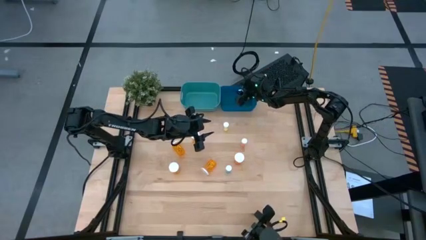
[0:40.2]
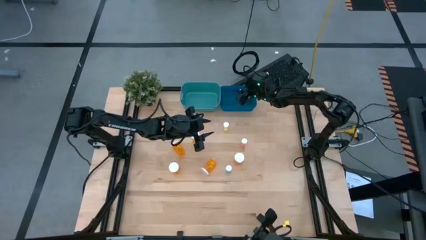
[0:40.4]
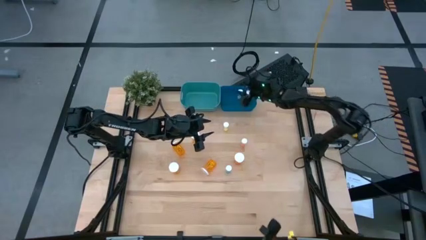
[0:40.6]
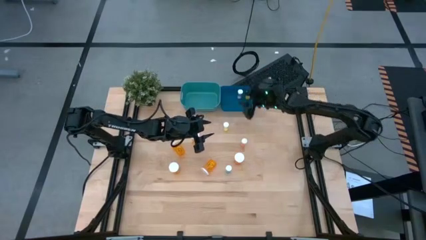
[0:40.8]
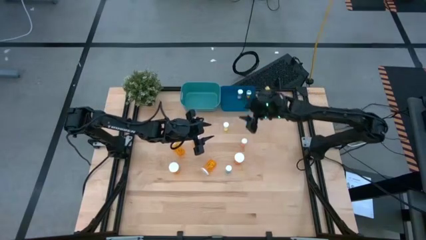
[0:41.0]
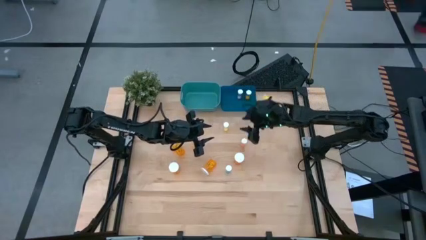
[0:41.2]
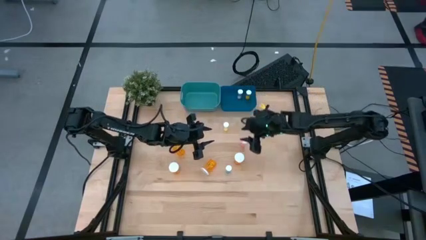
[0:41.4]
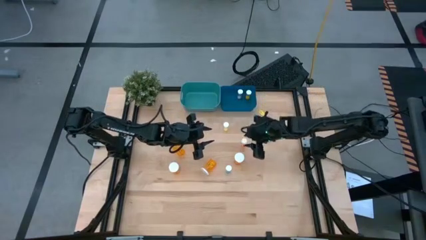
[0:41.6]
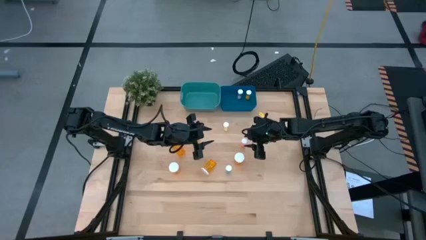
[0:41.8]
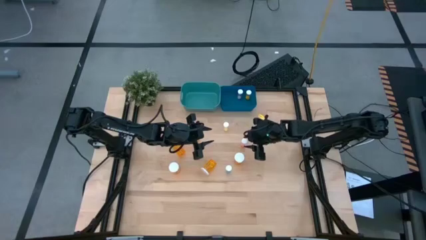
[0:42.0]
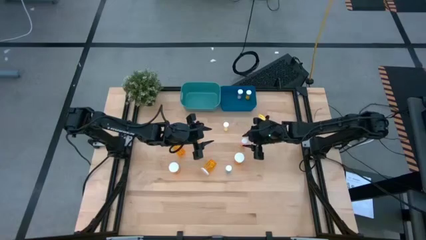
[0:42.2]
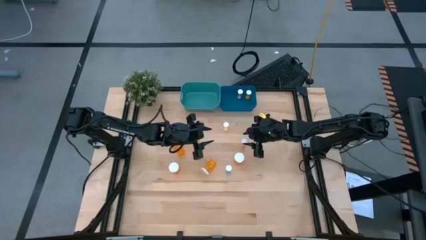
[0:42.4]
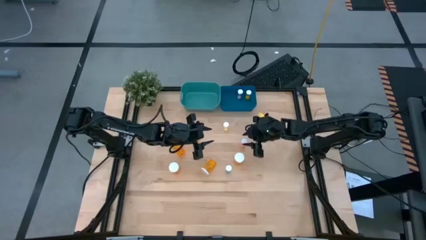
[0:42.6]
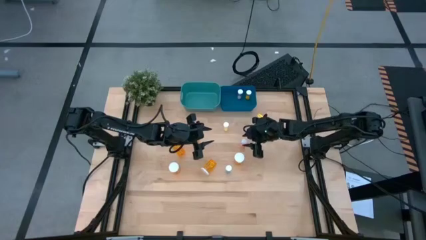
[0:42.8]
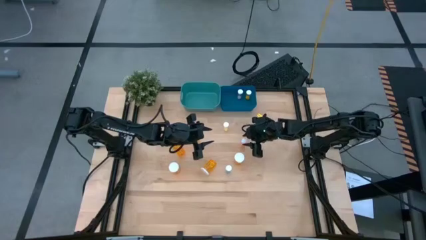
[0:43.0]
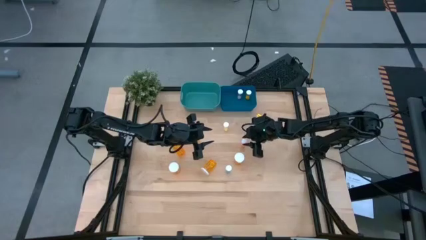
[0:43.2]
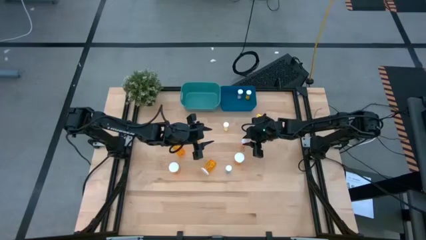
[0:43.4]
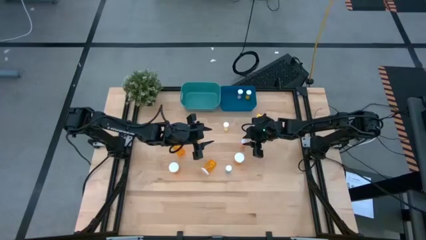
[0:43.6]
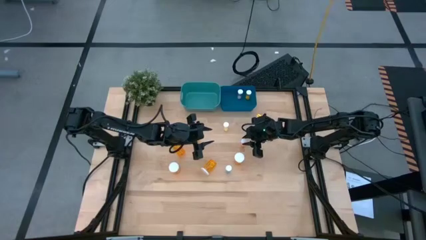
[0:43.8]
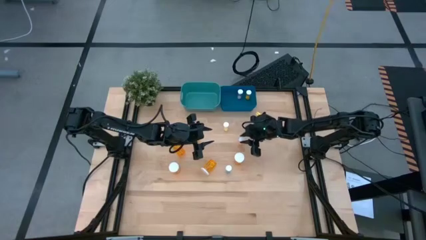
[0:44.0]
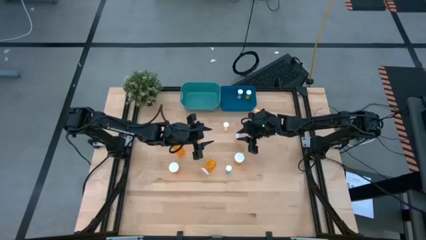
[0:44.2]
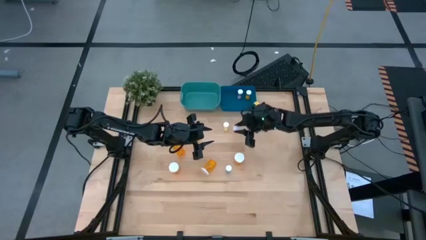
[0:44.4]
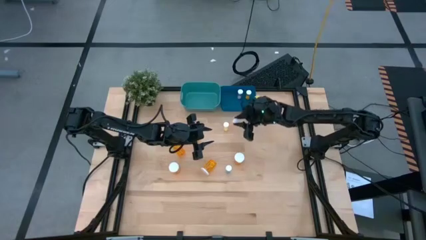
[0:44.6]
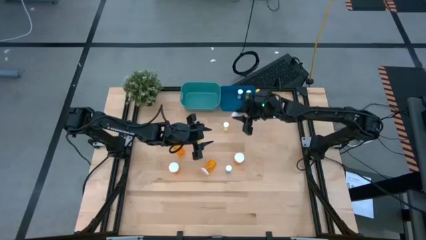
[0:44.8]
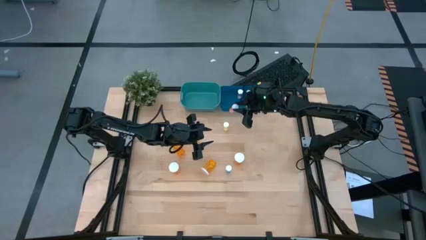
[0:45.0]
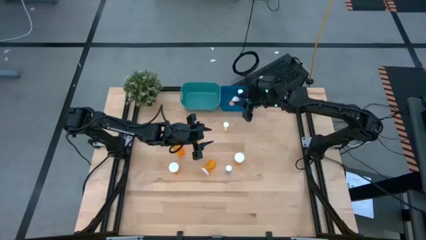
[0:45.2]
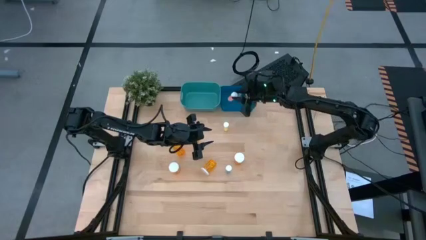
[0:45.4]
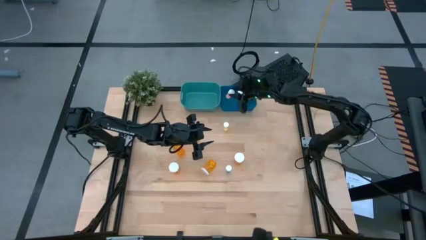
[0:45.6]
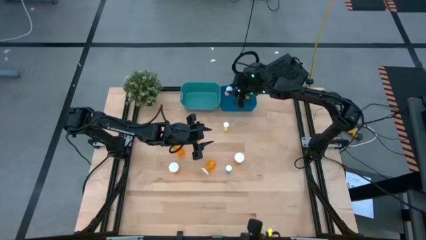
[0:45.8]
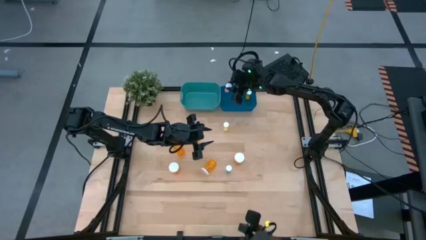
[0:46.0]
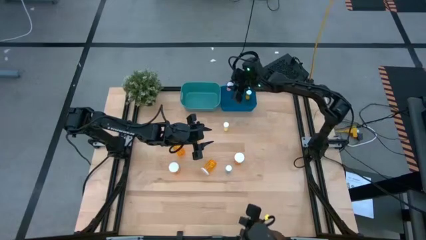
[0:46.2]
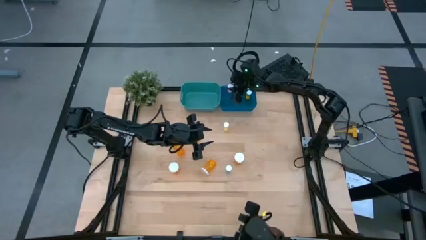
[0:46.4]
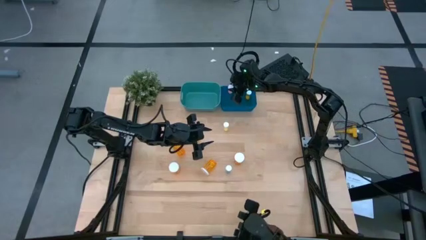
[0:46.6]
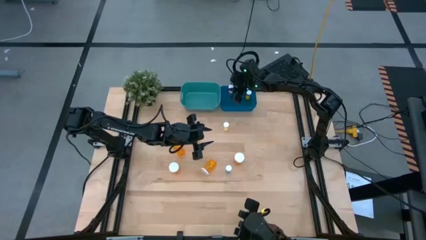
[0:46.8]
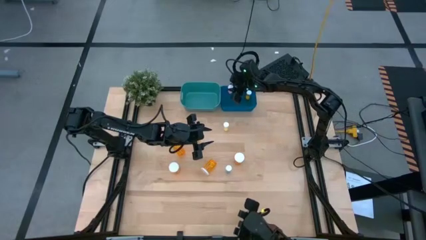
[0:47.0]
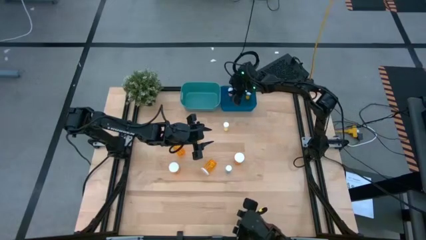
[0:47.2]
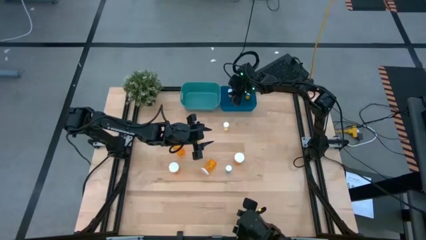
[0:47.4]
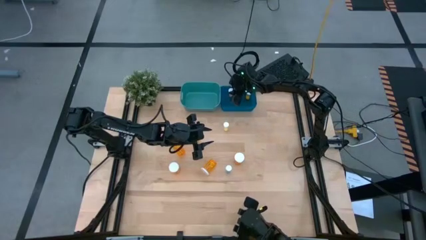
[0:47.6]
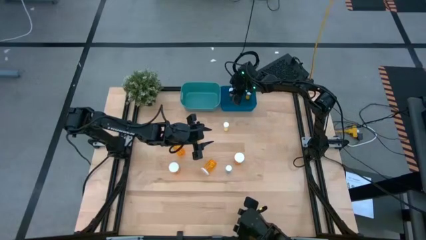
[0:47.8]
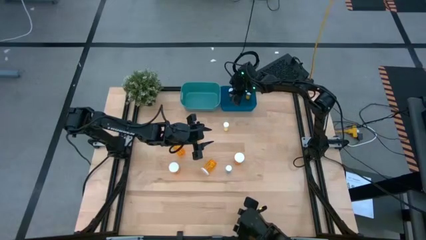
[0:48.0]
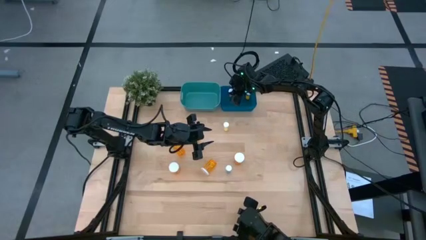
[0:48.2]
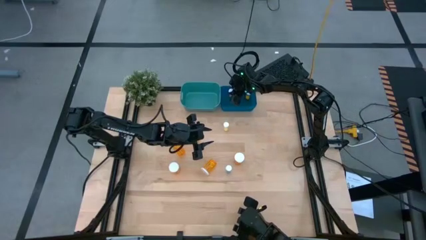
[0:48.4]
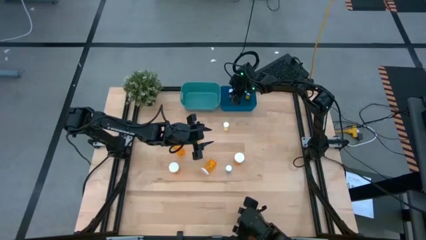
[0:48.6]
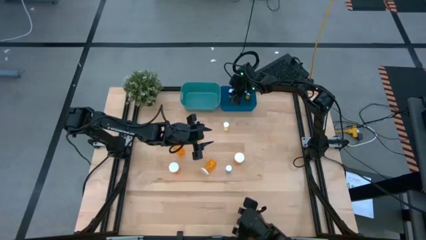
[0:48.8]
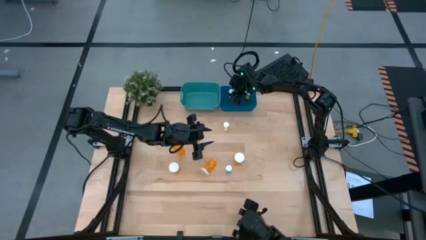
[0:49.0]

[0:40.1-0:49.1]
Task: Pick and place medicine bottles into bin by pill shape (circle, oval)
Put the small pink tablet bottle into the blue bin

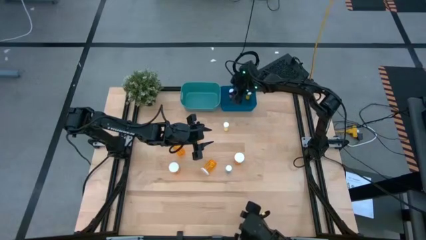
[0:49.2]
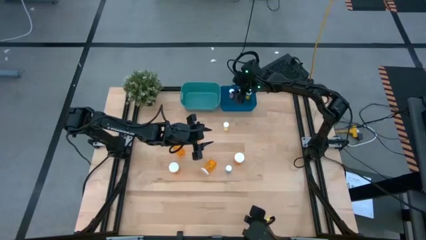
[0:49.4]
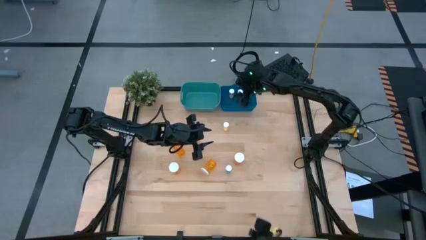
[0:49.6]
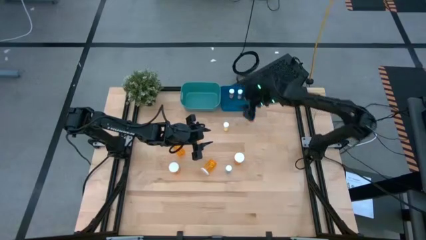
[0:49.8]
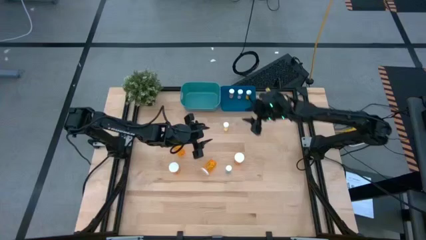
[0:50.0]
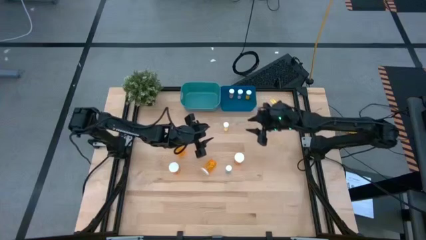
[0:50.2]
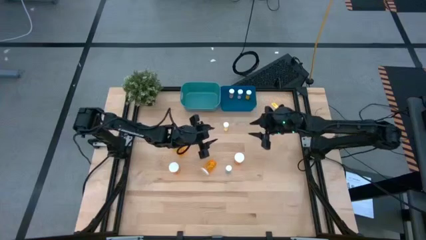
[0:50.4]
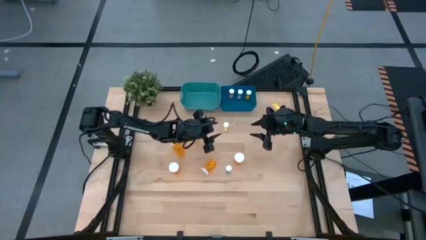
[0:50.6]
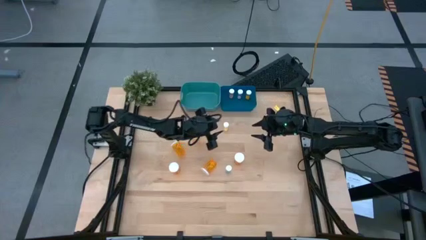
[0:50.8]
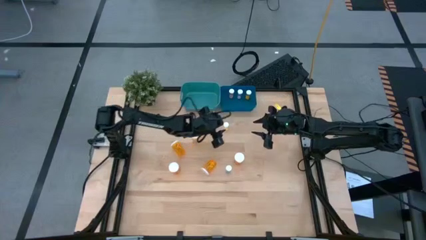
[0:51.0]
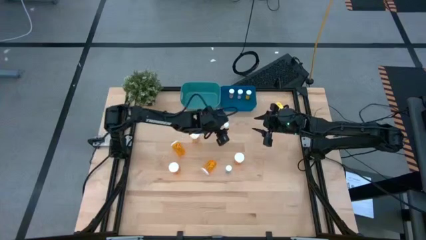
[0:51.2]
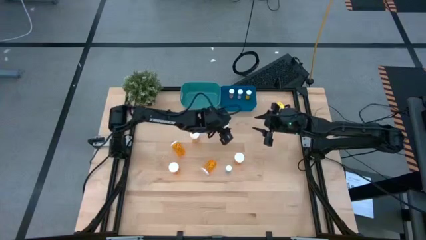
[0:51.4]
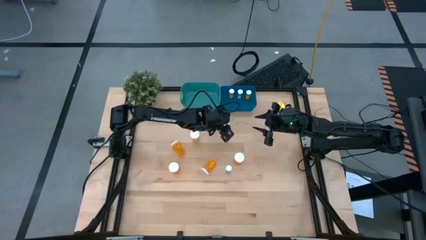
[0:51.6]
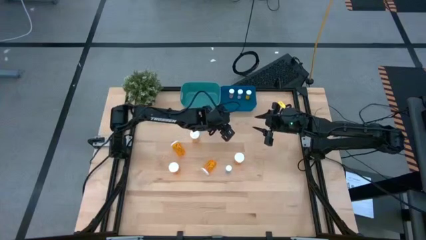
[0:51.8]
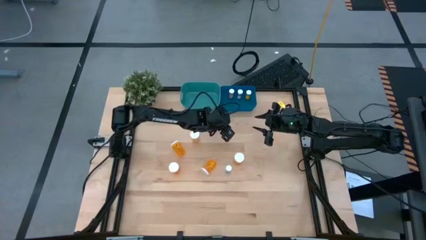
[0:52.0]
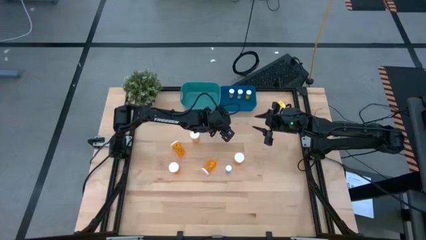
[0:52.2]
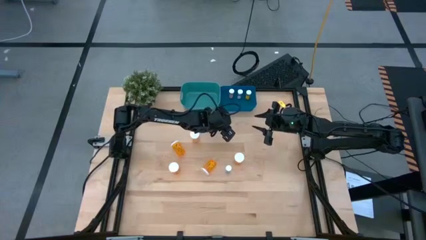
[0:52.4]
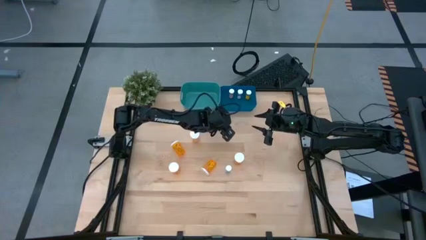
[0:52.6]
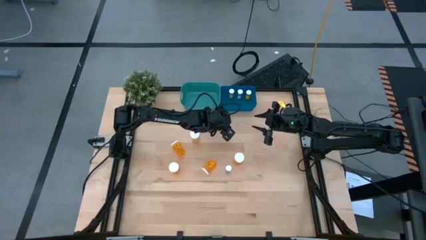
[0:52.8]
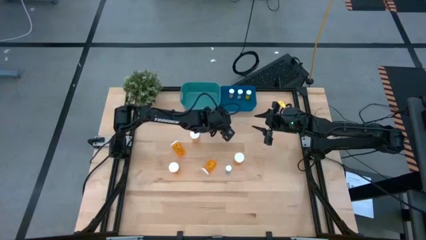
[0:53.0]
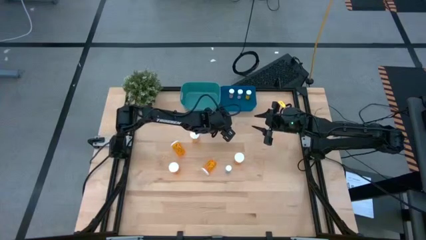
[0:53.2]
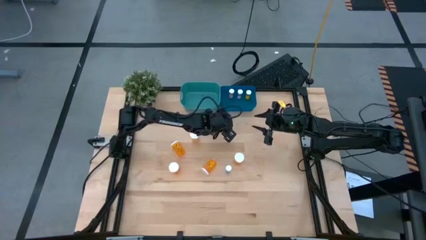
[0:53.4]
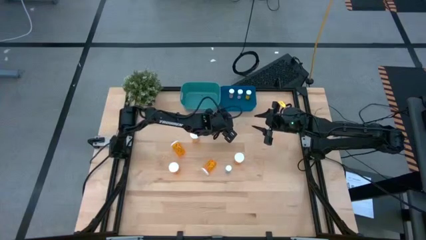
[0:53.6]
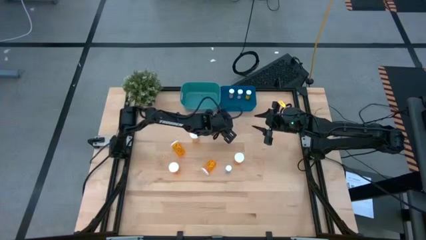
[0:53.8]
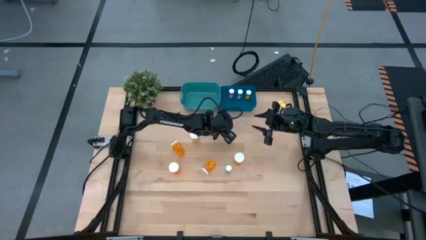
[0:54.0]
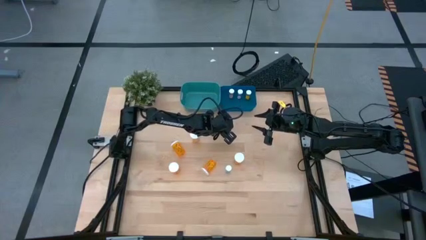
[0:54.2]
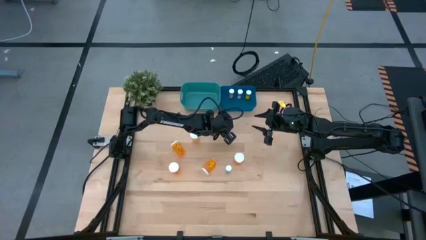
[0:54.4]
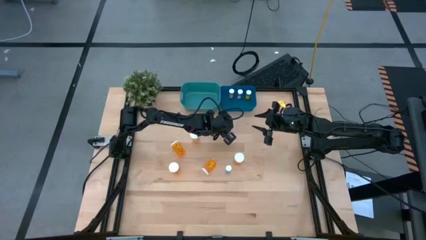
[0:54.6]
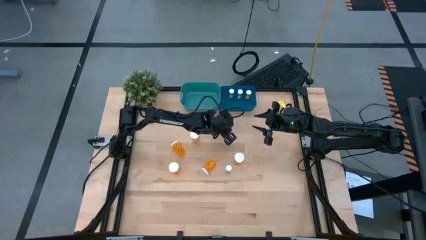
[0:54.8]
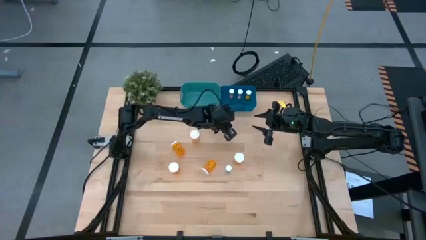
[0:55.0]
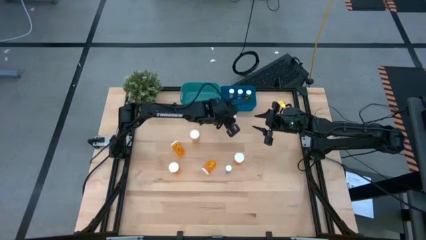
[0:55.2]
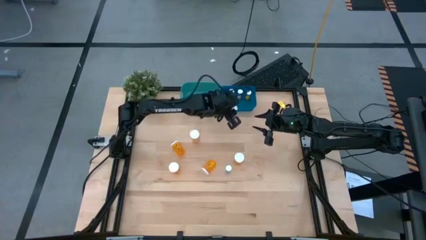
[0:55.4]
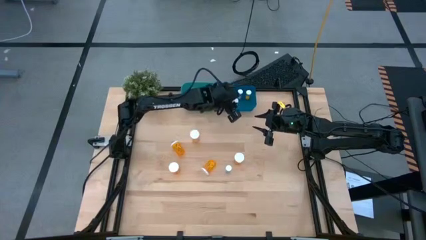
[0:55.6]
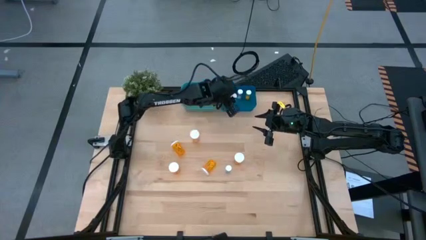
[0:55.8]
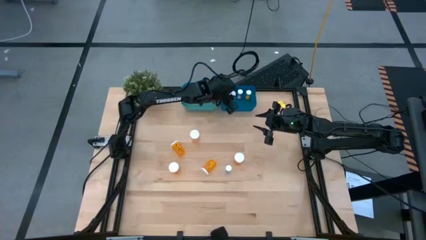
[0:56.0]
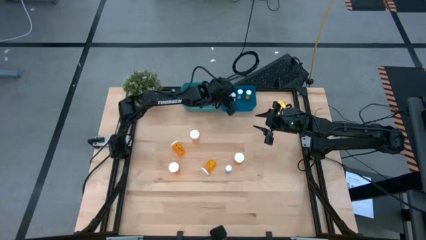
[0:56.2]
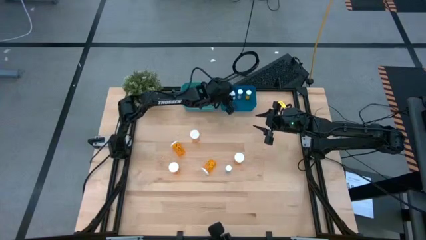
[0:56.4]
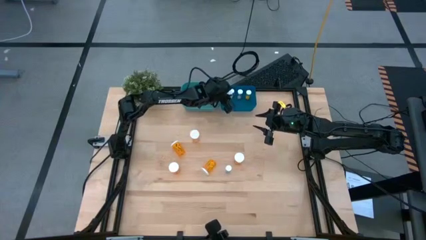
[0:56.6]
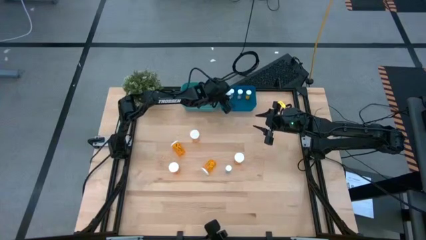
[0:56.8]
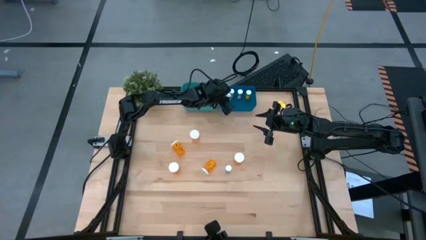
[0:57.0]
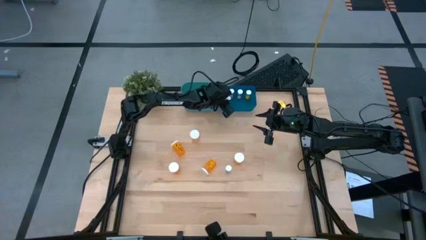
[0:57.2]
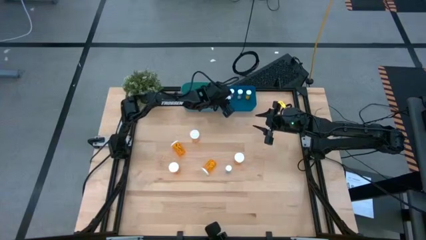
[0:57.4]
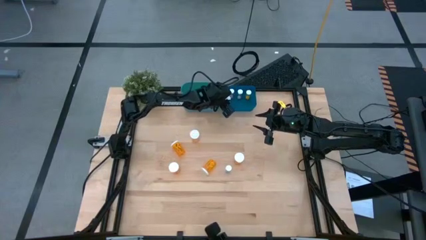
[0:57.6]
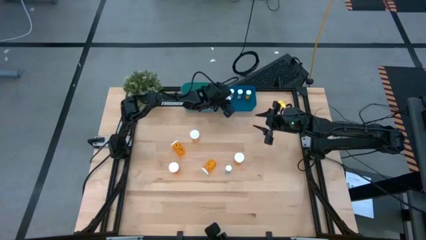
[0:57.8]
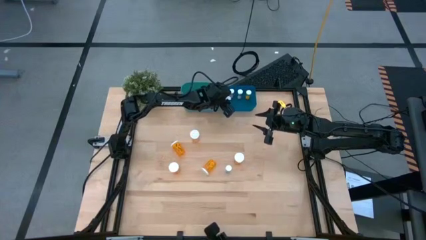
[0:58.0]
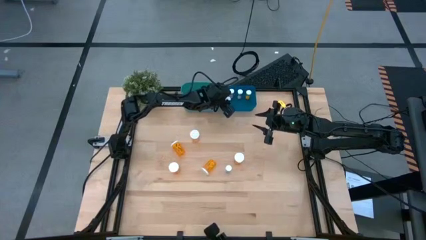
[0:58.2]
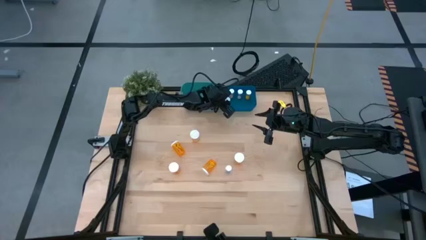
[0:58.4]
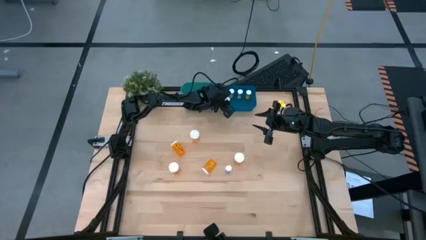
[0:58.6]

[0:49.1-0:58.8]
Put the yellow tablet bottle into the blue bin
